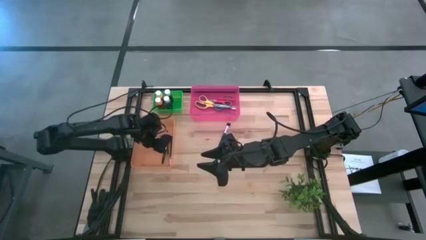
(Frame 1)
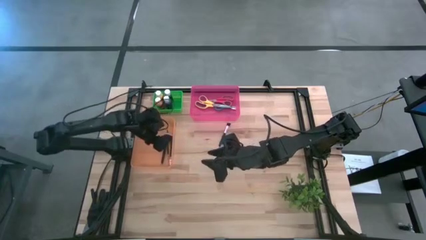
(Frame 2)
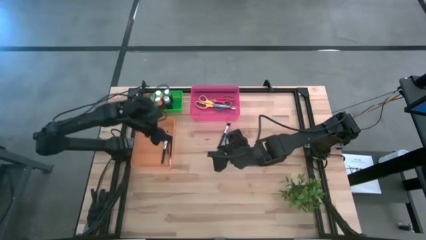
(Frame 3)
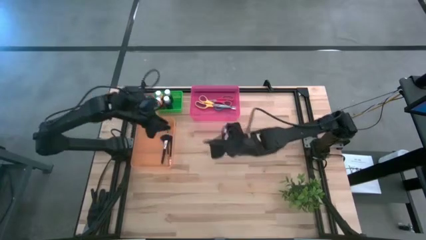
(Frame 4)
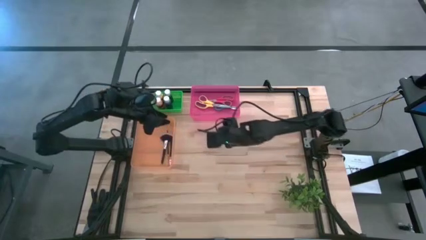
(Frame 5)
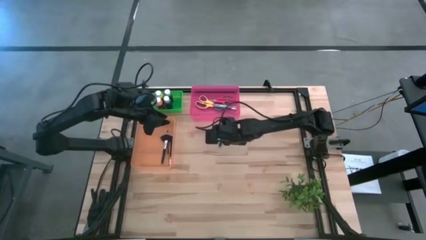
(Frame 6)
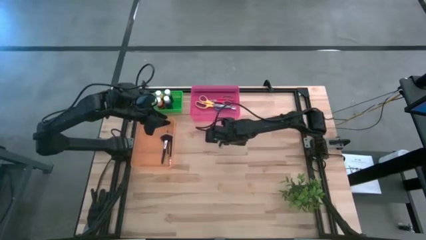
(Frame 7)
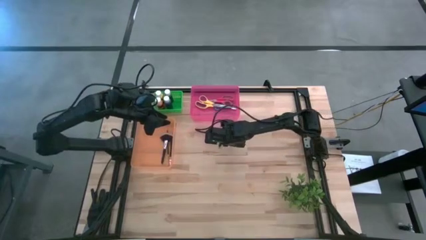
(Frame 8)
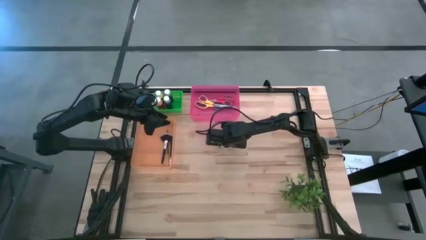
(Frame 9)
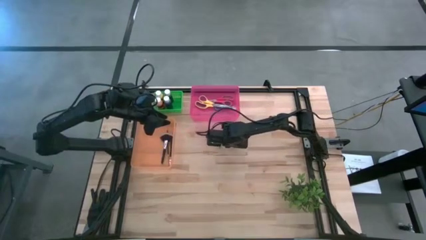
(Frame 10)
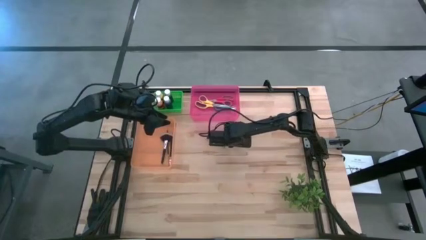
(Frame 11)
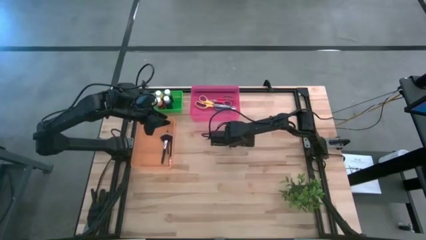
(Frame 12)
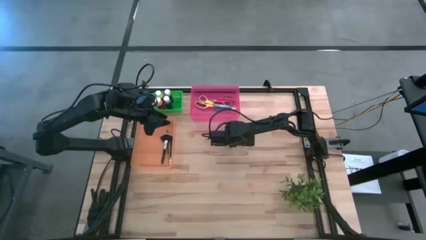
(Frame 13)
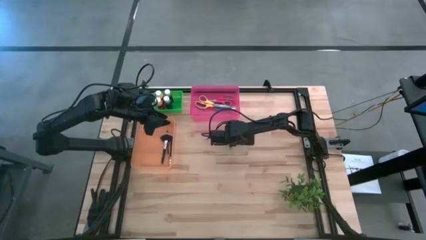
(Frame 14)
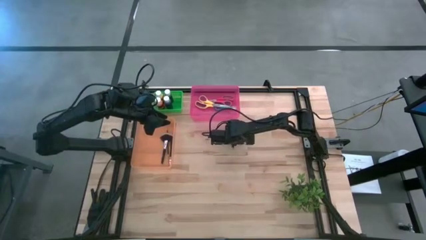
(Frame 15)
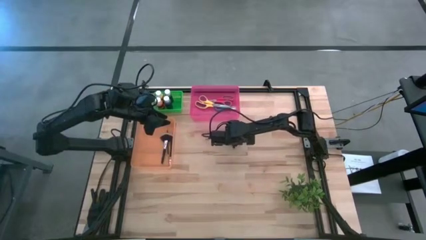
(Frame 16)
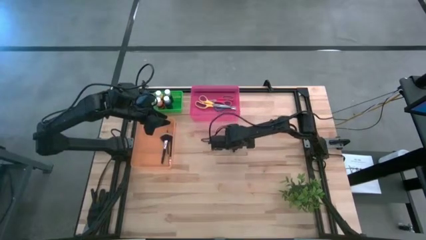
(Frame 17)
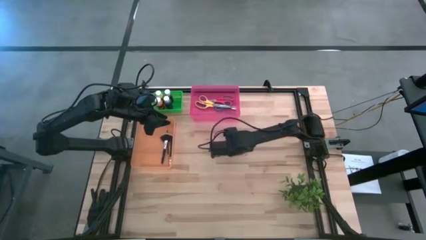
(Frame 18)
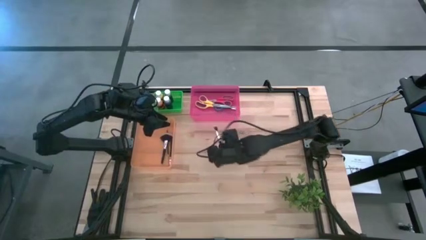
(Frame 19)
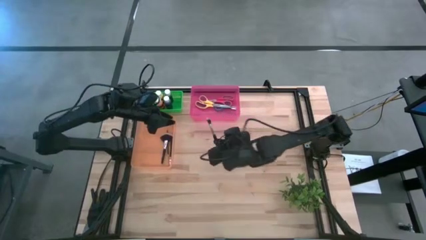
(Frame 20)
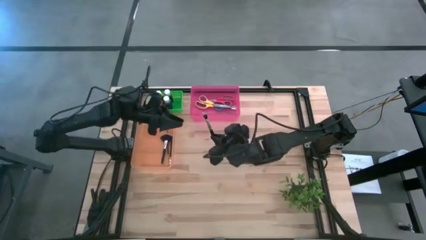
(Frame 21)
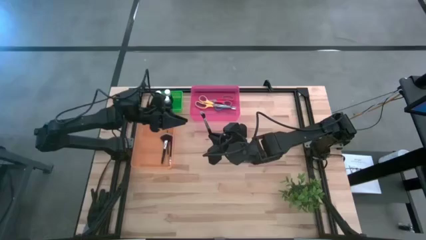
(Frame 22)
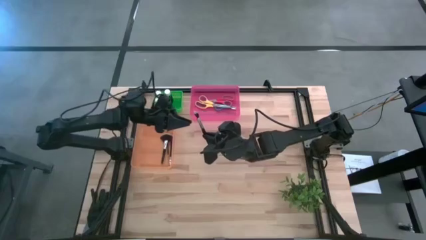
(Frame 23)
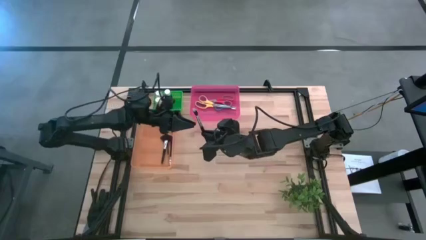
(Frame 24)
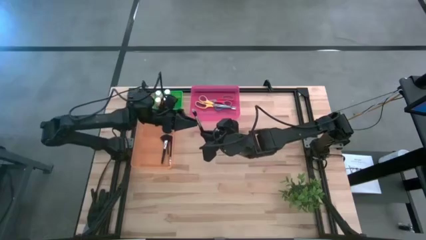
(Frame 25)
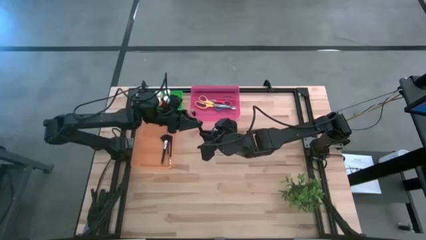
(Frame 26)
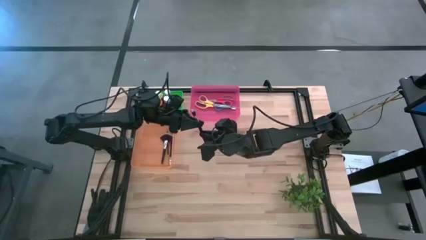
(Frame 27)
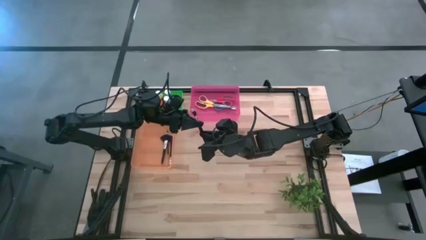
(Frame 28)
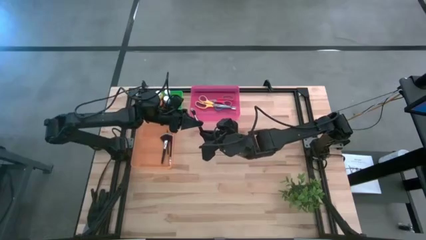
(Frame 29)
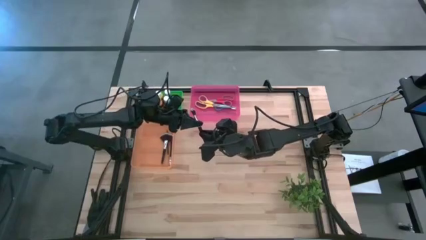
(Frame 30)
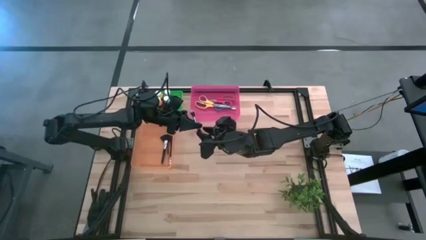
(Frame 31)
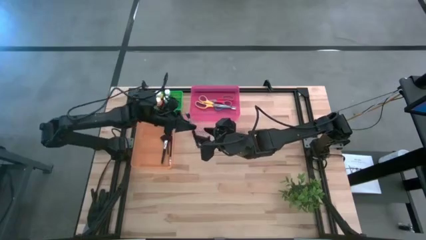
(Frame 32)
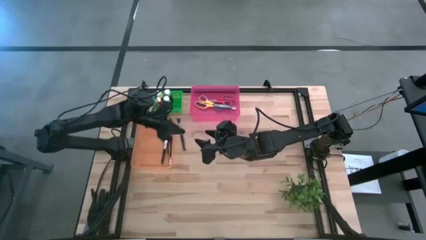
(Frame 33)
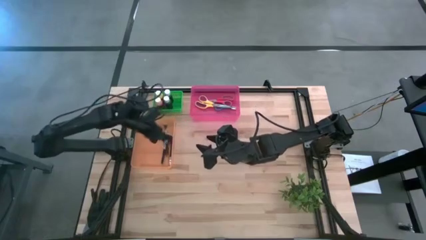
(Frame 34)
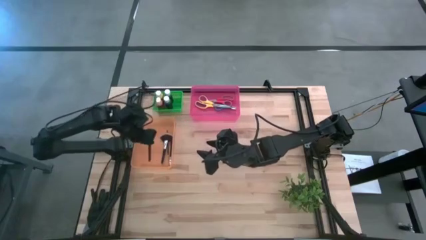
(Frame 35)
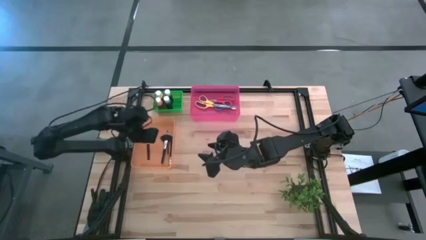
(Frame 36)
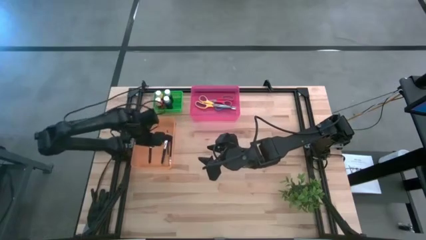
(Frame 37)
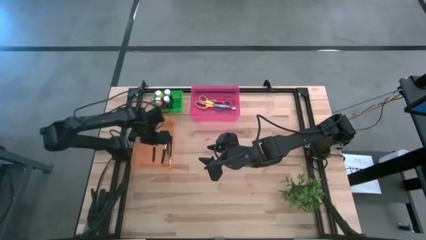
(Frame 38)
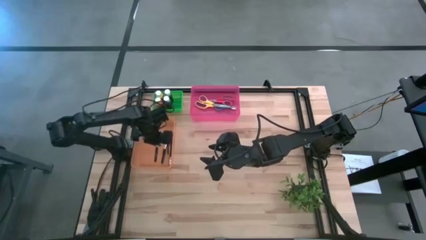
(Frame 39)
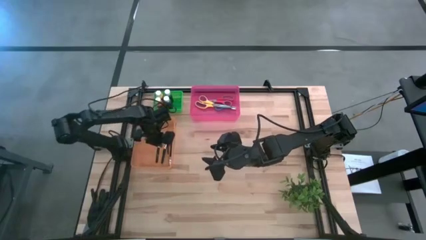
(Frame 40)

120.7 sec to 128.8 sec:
Task: Pick & Place Paint Supplies
Put the black paintbrush into the orange bin

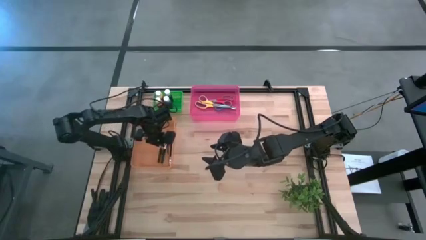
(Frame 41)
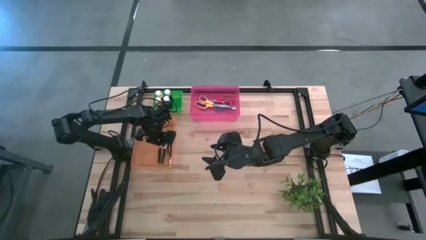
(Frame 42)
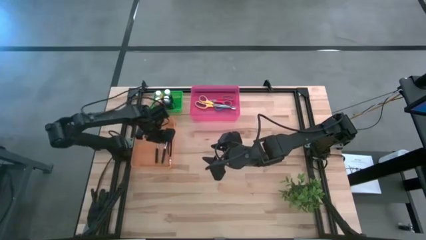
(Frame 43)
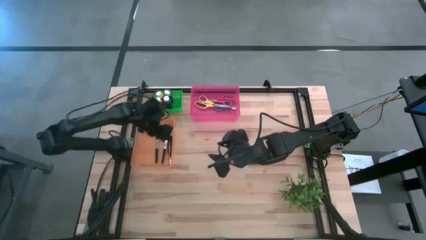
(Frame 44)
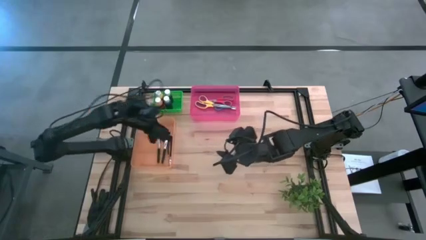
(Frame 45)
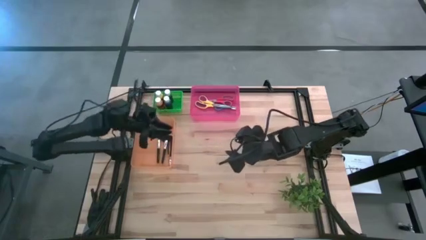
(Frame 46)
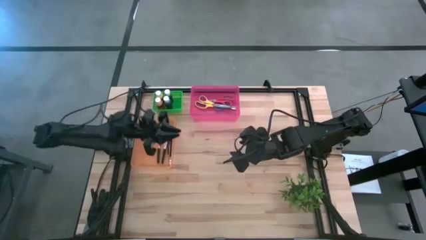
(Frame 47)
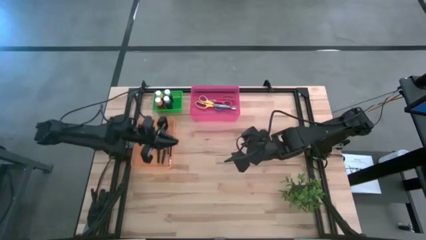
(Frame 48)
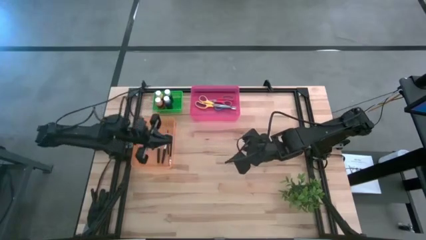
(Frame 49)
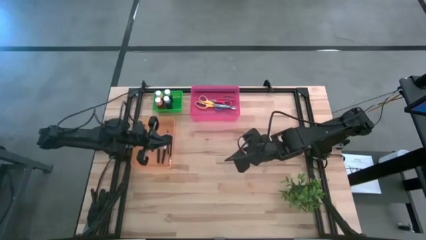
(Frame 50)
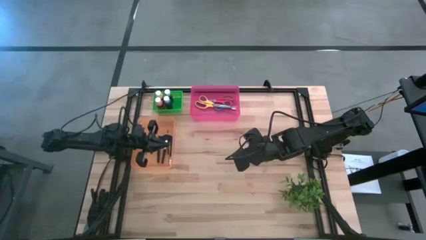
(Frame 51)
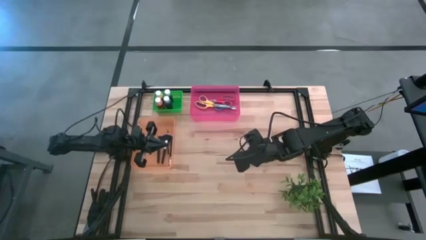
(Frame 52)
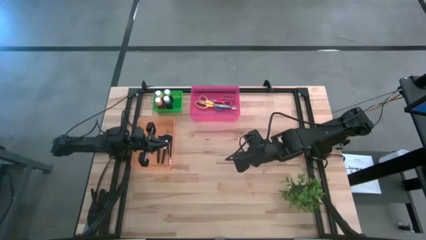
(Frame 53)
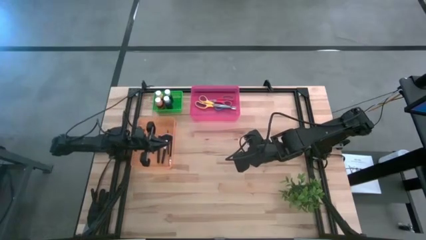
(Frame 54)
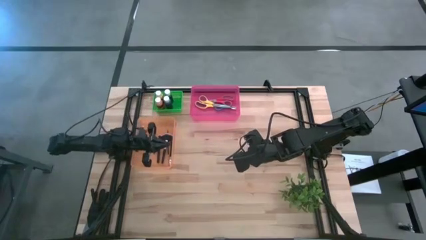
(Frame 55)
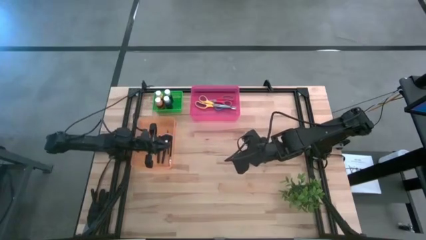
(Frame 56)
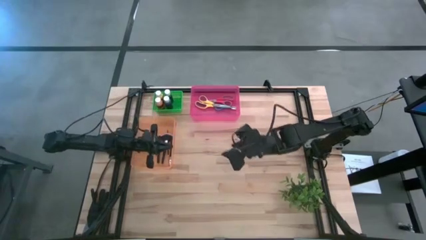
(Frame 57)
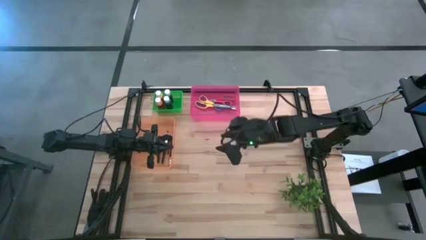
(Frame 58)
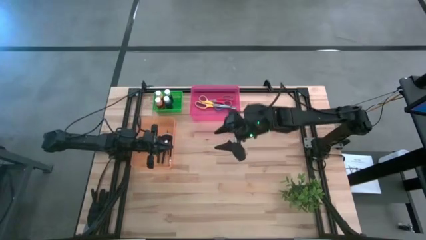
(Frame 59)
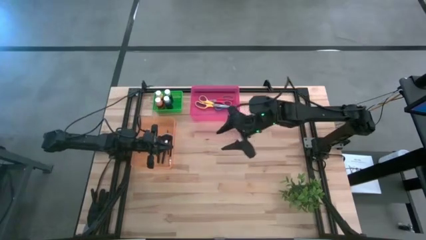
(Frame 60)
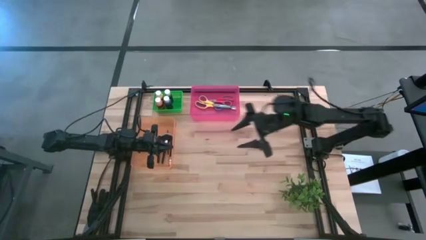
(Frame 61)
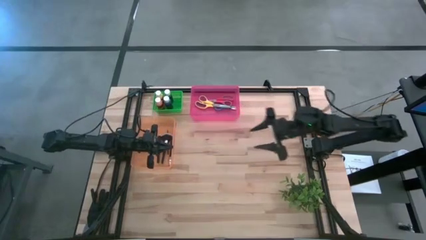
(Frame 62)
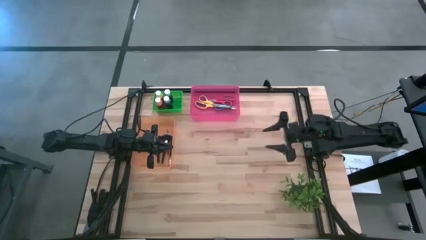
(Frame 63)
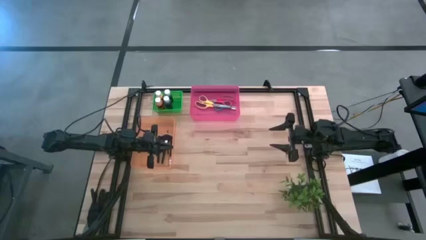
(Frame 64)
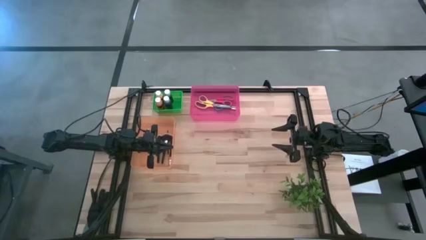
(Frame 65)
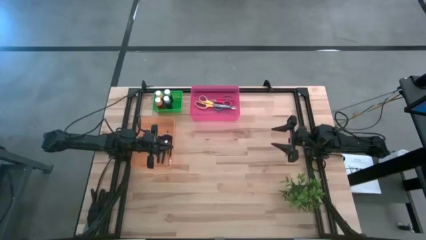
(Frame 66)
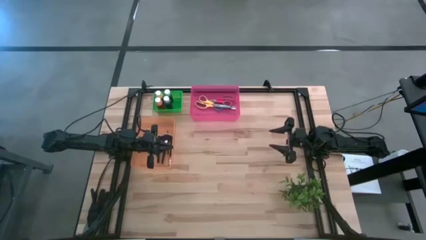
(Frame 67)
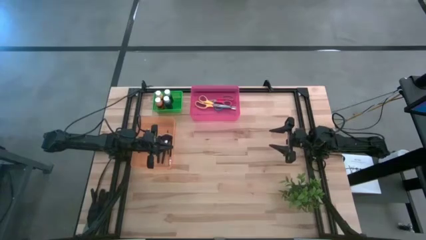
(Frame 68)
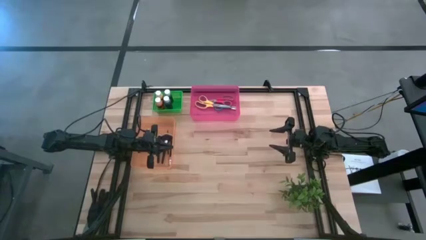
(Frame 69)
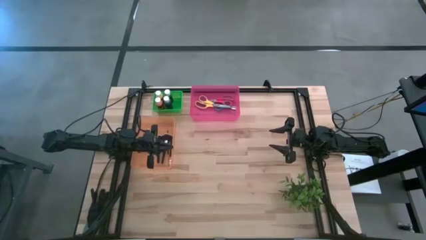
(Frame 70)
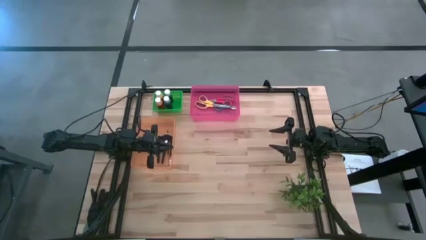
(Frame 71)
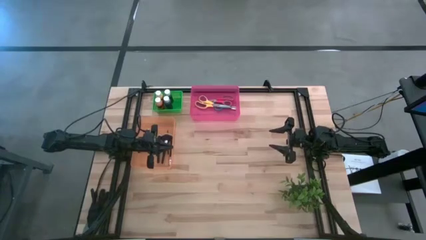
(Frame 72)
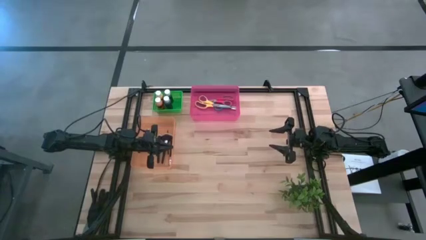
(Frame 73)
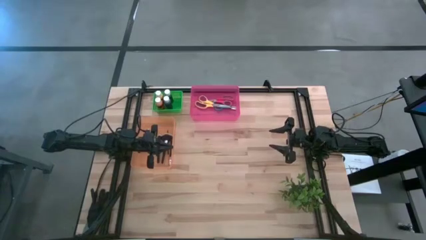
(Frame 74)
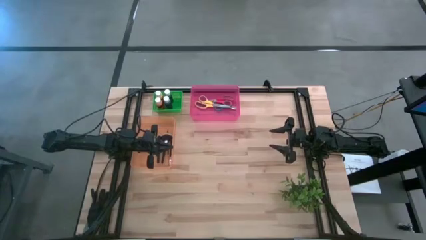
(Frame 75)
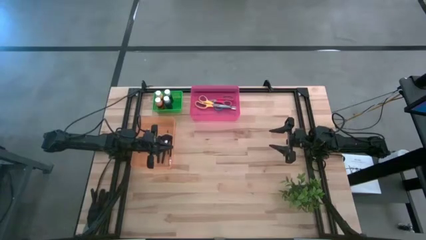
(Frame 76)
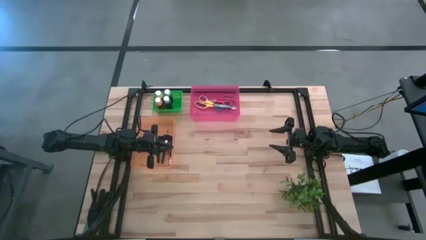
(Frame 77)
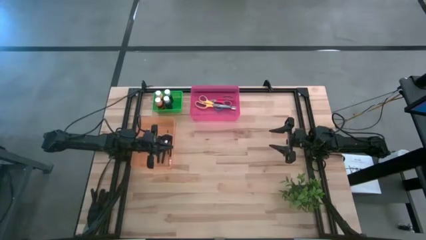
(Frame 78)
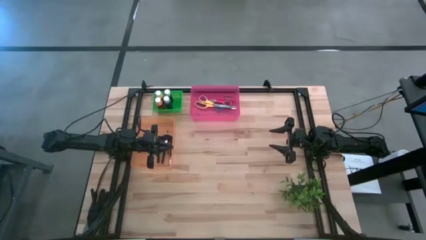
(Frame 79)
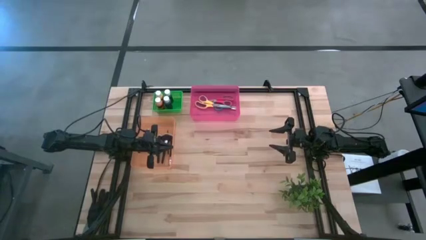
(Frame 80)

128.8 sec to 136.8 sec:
Return to Home Position
